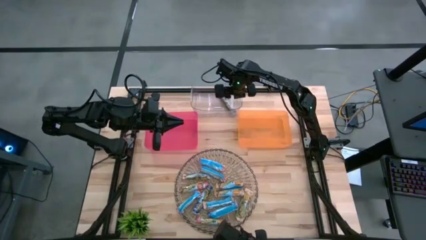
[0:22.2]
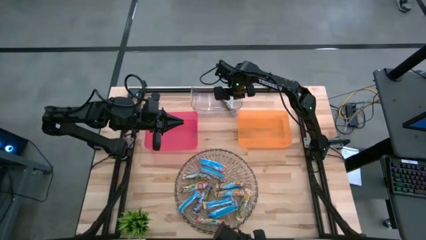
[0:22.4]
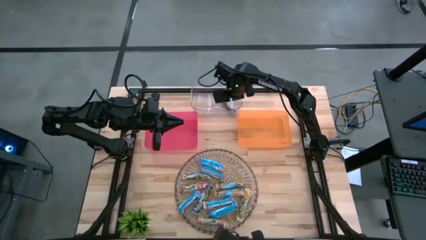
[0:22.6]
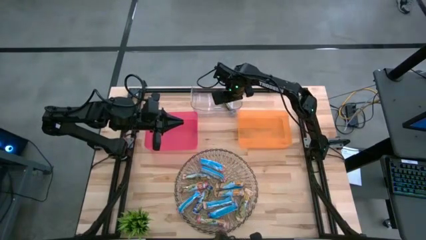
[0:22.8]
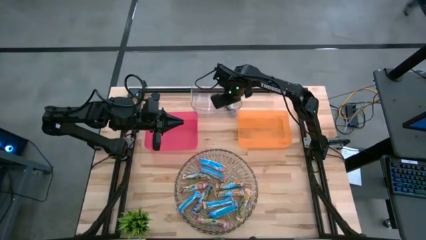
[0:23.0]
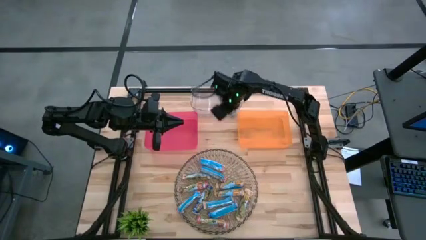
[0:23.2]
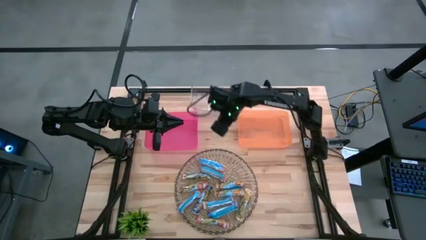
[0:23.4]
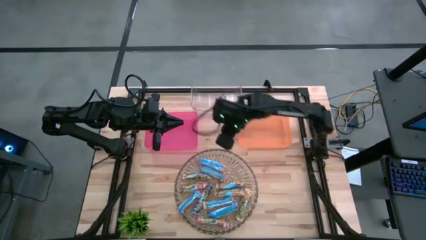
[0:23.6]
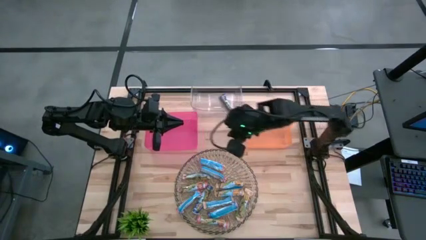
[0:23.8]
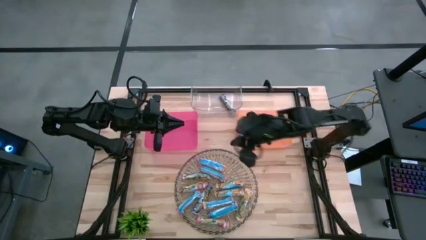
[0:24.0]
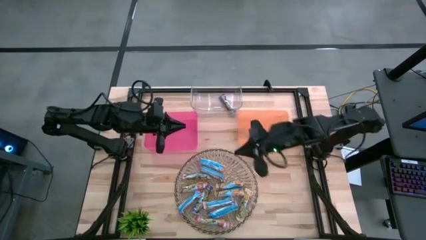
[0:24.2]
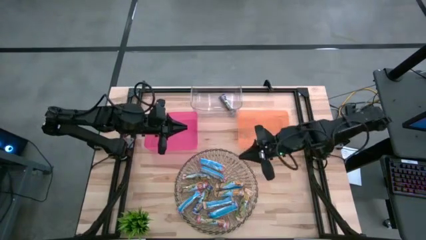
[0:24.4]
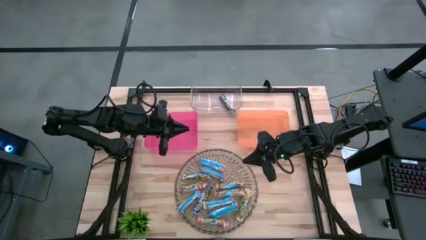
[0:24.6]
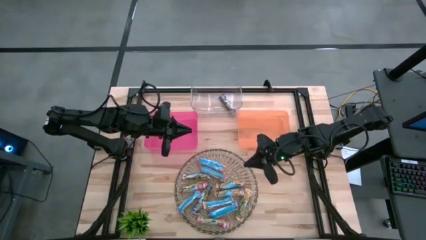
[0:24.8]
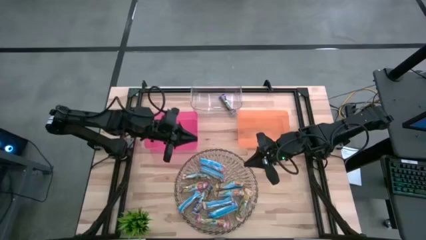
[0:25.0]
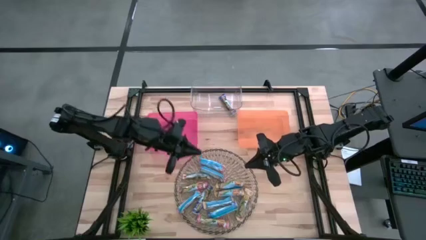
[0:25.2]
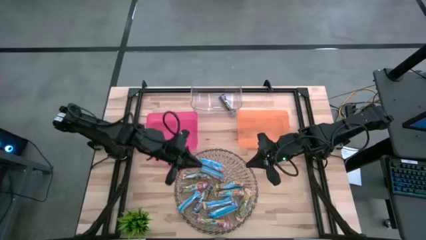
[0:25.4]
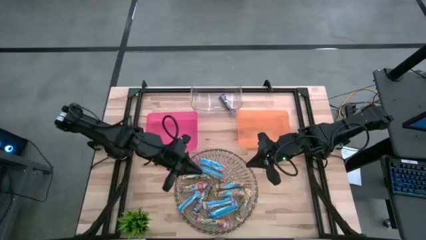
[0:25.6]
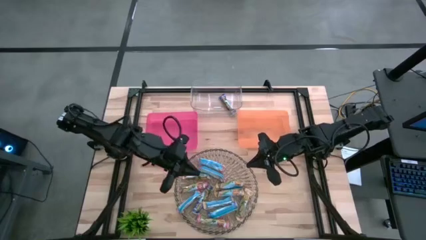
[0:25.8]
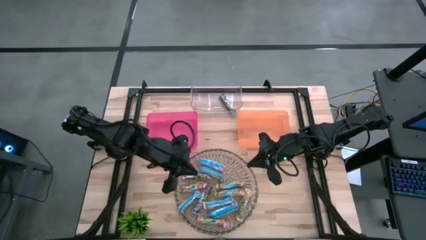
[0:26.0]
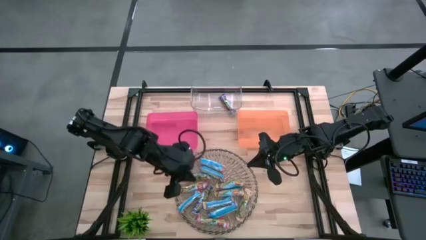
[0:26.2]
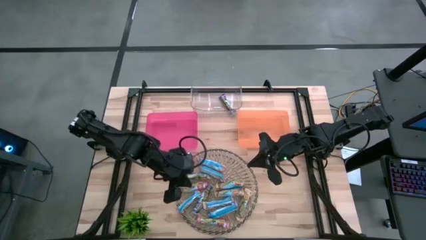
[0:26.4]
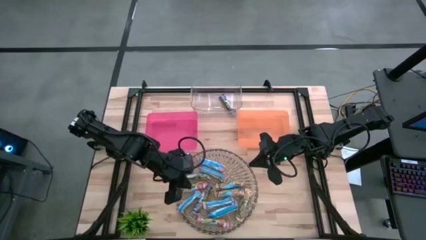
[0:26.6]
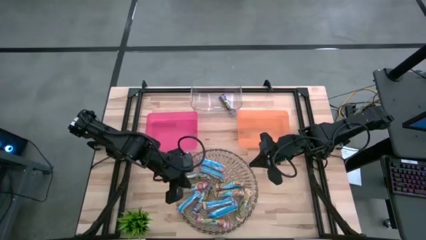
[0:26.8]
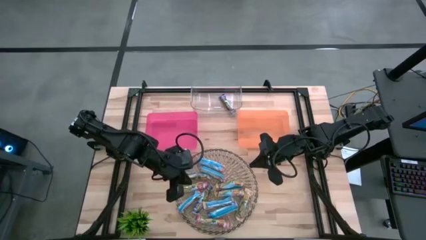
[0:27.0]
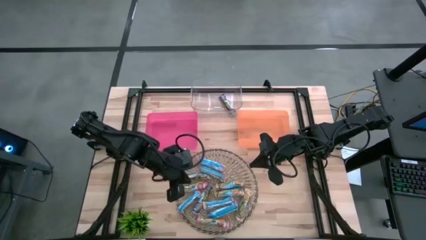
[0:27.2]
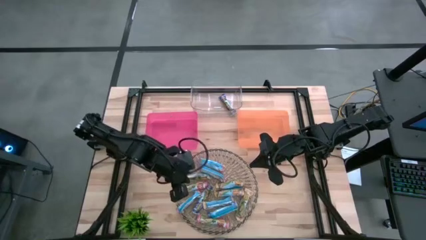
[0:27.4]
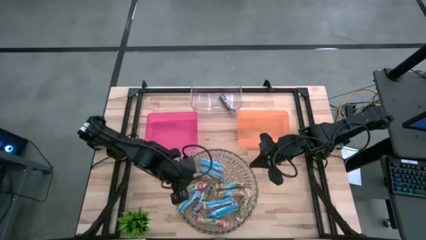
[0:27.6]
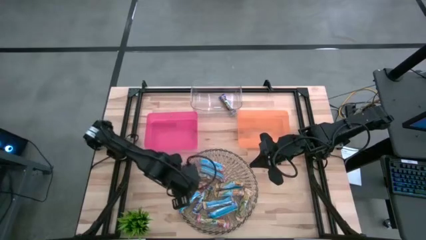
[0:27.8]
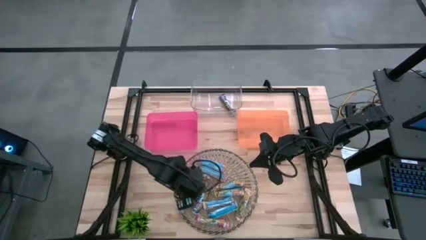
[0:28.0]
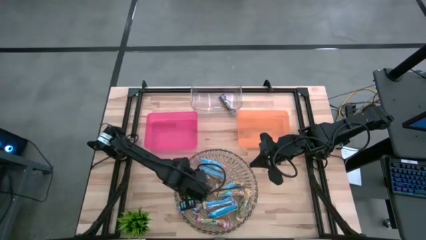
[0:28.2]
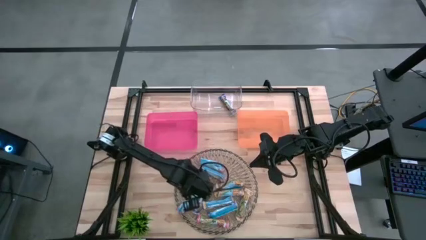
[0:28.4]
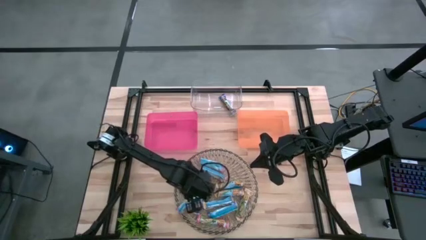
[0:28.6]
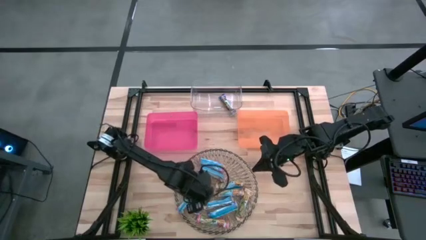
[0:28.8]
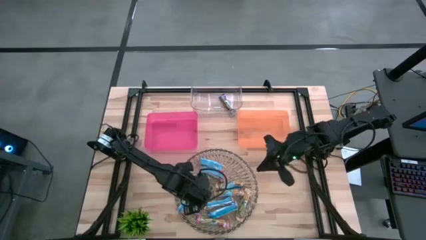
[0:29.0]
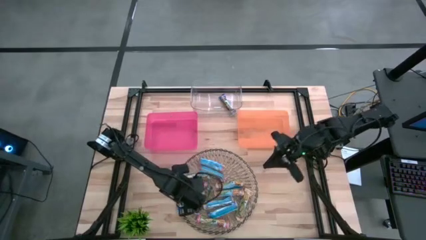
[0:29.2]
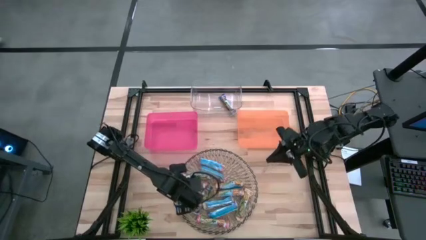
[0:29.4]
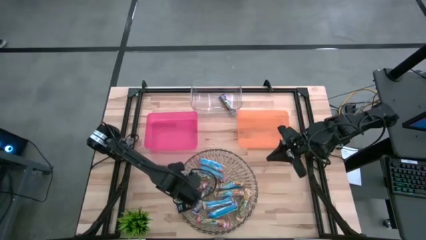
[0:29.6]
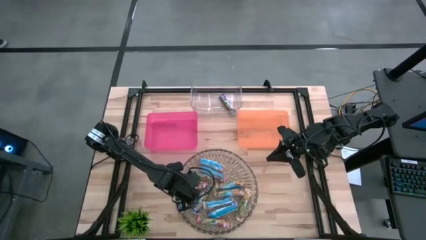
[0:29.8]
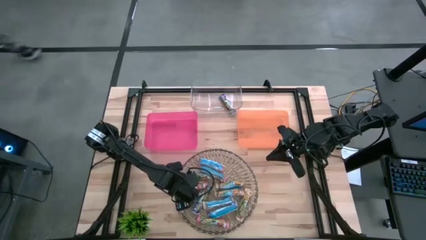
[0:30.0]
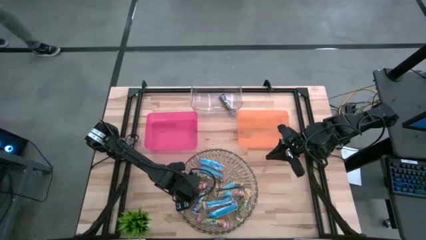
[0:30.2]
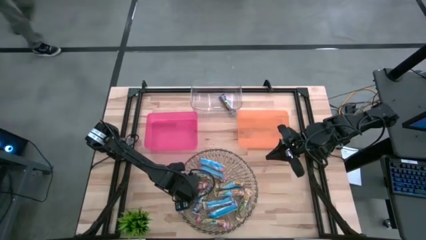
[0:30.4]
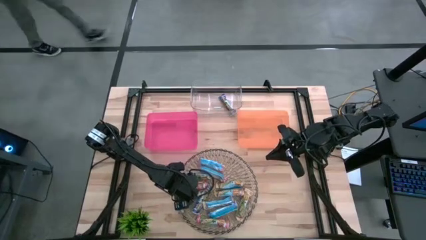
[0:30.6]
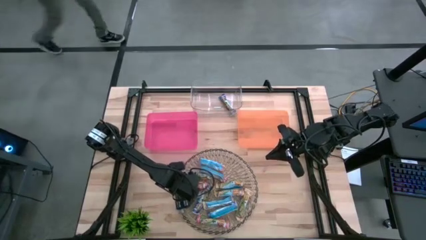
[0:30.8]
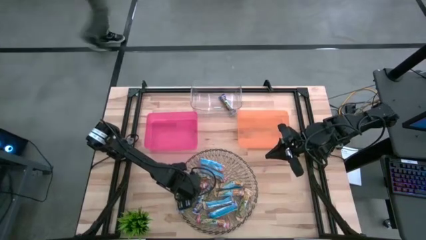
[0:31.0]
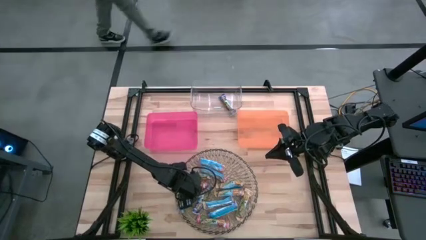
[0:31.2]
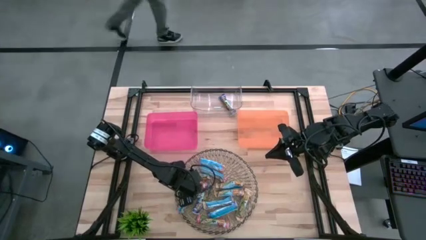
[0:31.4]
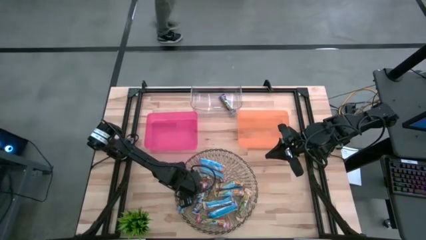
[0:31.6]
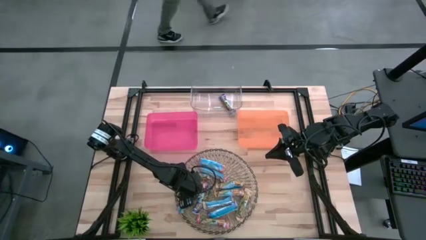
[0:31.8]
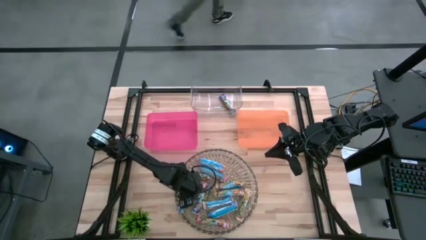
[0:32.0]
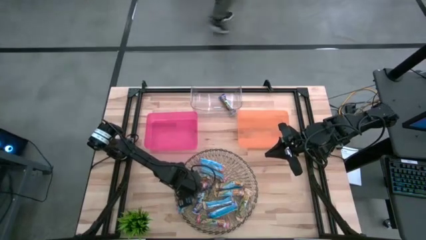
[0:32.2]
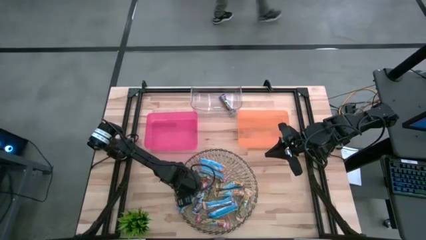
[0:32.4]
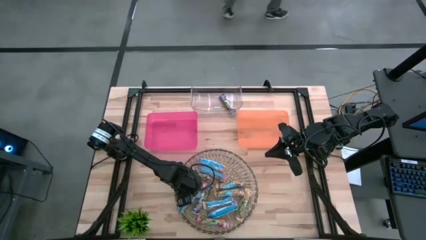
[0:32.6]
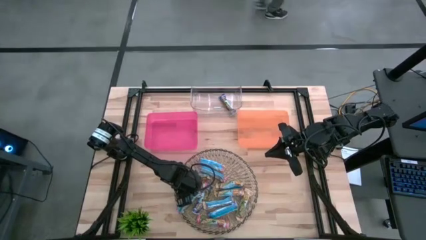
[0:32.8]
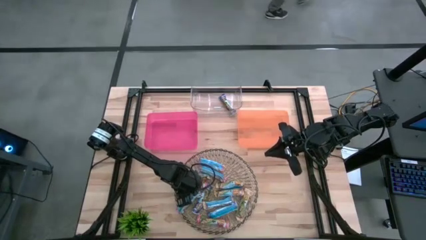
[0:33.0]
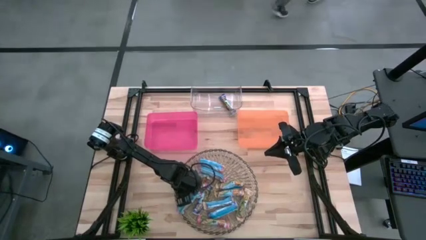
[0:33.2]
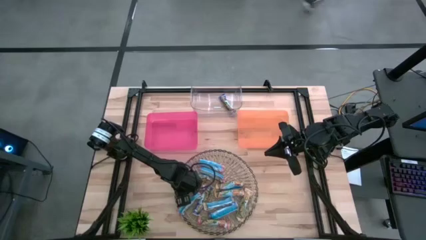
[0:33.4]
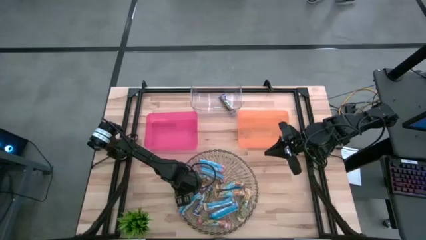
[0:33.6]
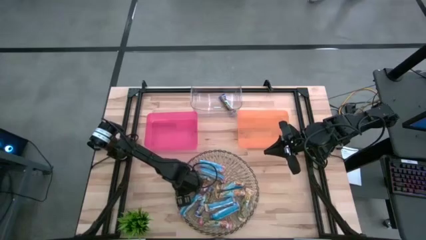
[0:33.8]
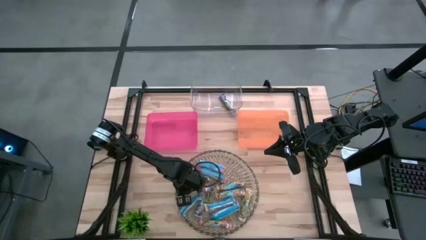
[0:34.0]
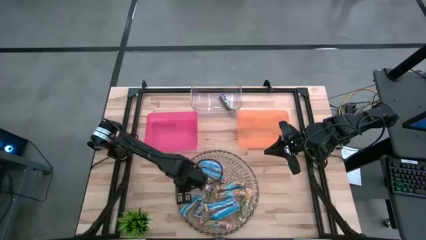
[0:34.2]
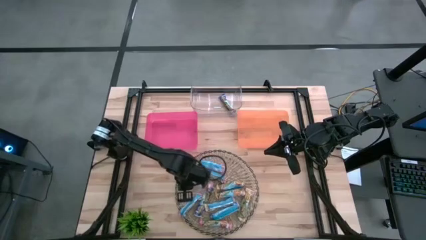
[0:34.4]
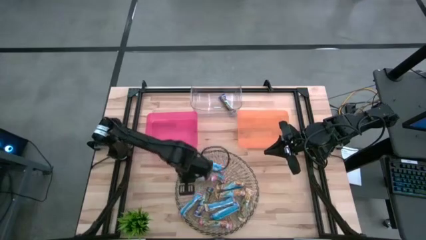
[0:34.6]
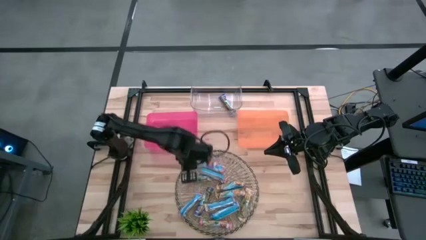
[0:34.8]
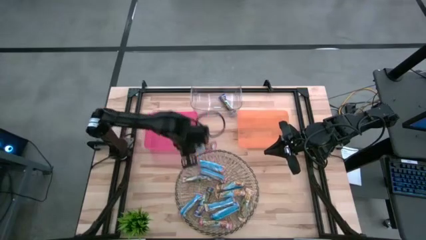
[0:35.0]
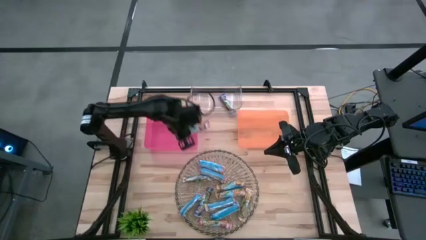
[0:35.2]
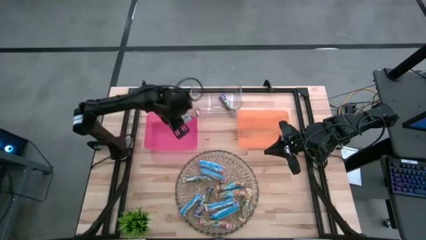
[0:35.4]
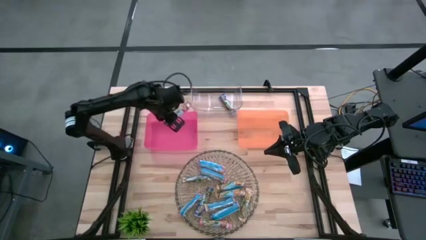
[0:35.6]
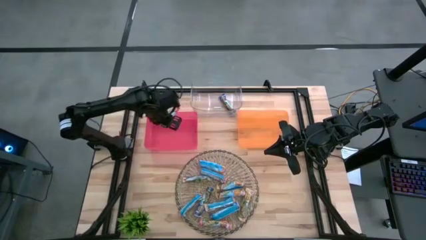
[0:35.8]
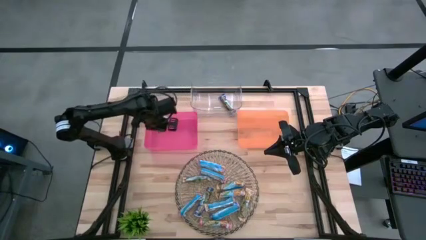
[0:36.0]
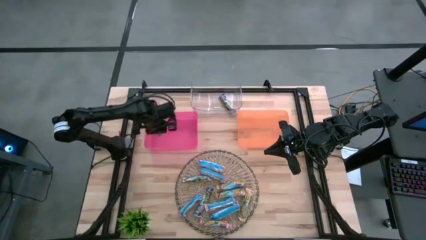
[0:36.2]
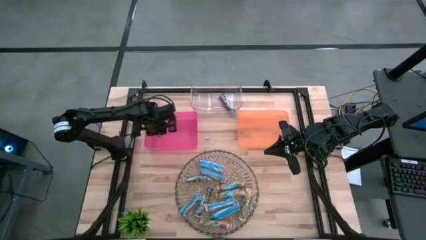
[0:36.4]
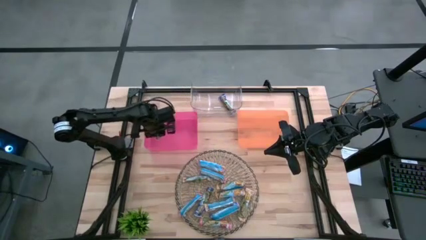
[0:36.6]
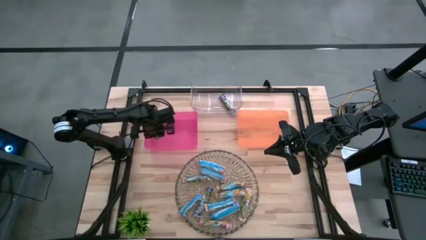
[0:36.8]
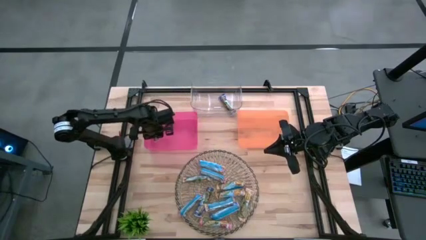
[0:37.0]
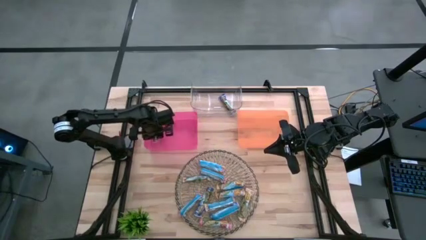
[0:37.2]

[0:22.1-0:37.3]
Task: Pick and place Granola Bars by type
Put the red granola bar into the pink bin

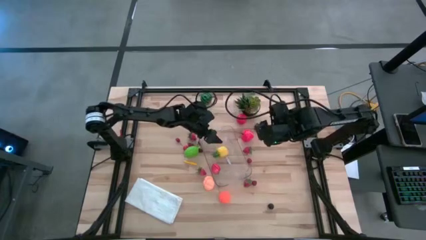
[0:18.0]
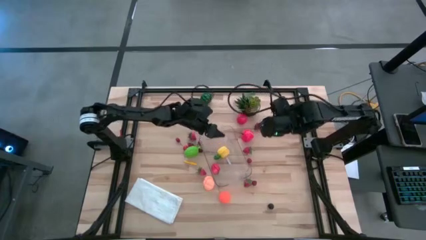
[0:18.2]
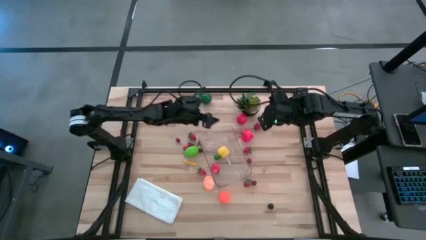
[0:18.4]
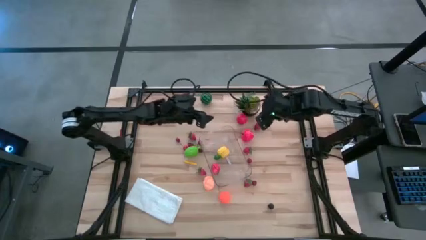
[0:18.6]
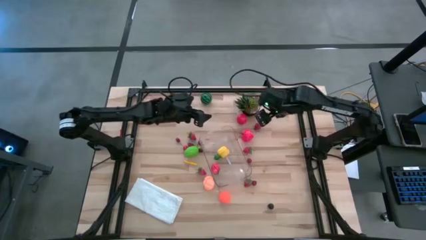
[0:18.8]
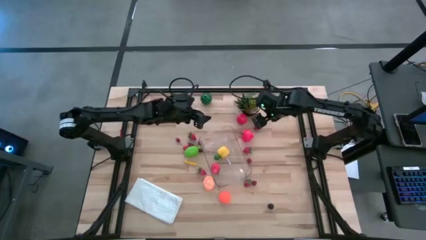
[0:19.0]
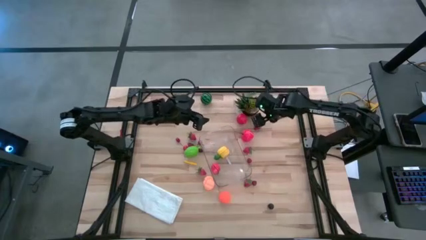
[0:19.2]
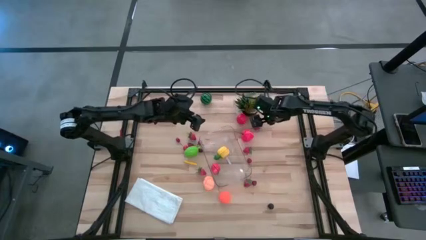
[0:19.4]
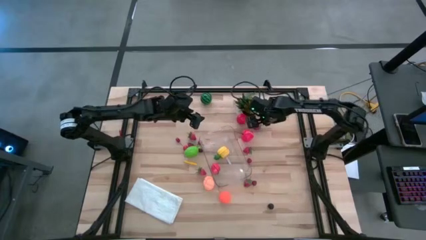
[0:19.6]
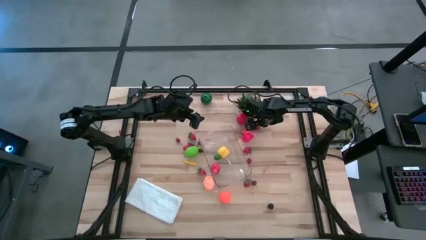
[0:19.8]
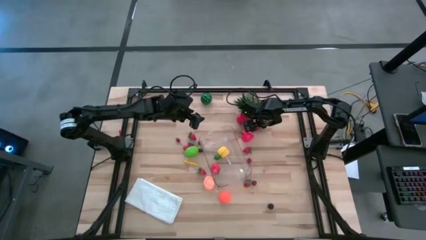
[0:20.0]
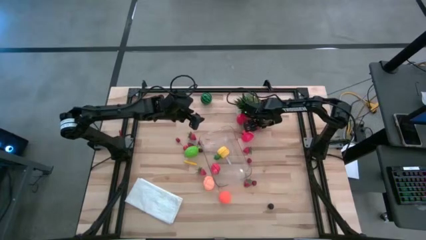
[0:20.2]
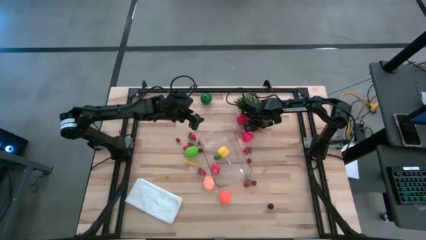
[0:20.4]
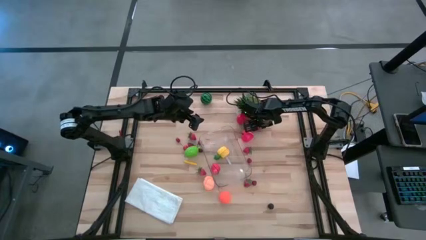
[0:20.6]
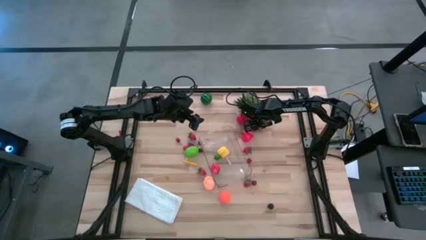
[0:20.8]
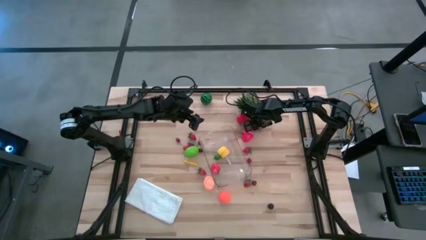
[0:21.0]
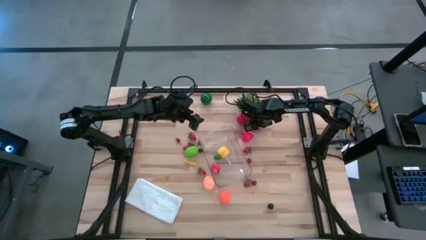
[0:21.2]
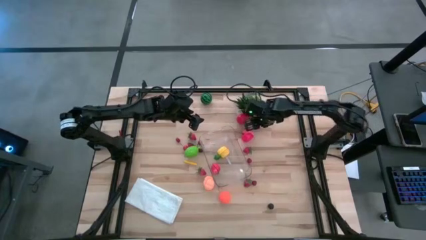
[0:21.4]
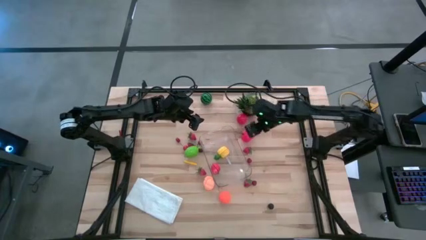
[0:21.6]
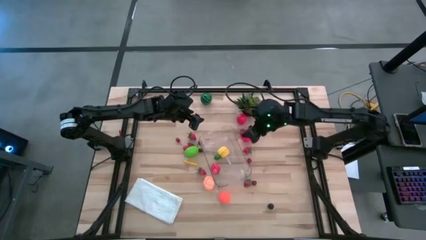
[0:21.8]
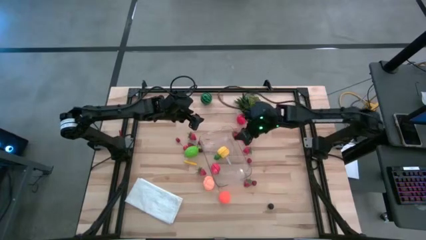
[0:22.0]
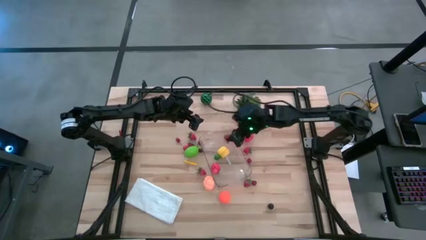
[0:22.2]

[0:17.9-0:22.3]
Task: Pick and placing Produce into tupperware
Put the red strawberry into the transparent bin
